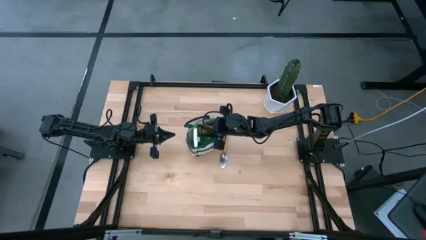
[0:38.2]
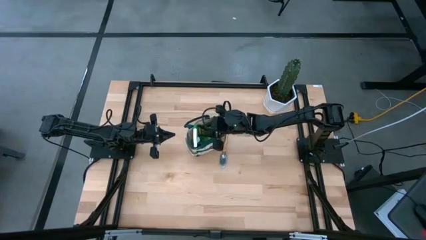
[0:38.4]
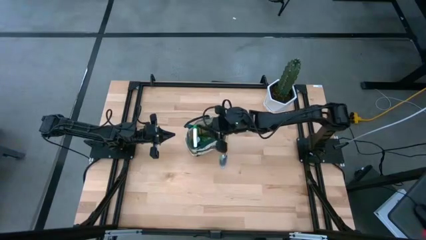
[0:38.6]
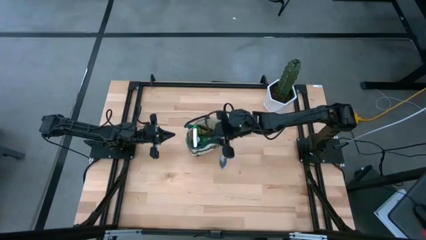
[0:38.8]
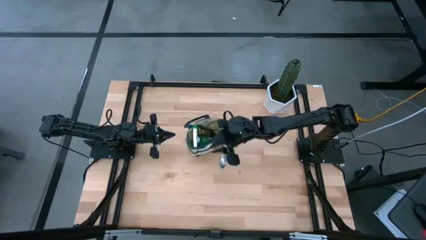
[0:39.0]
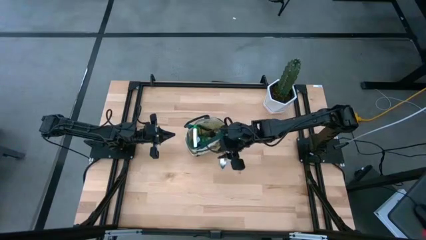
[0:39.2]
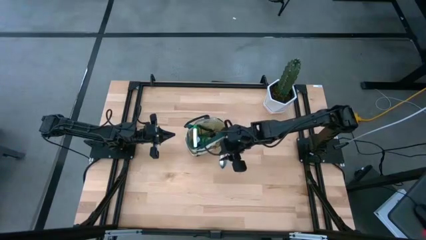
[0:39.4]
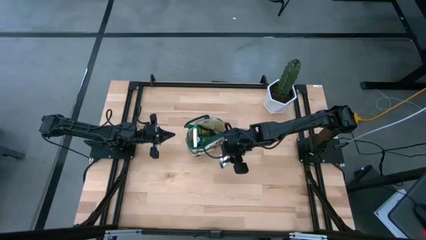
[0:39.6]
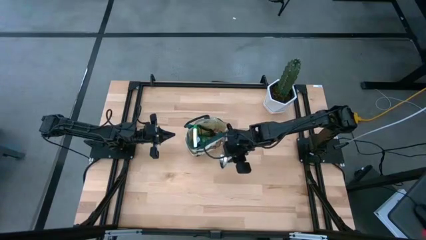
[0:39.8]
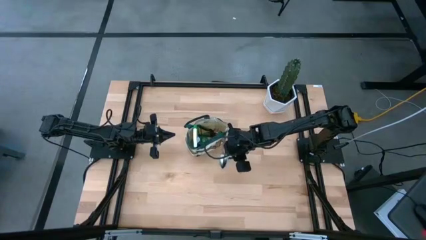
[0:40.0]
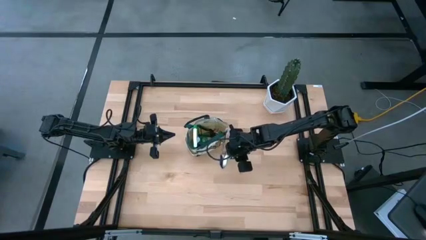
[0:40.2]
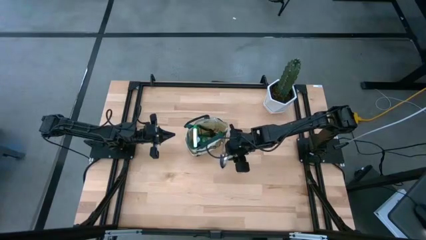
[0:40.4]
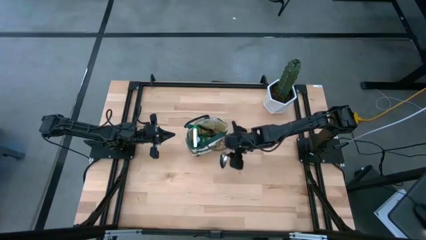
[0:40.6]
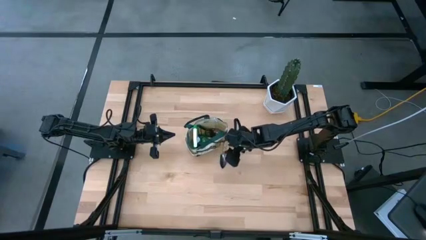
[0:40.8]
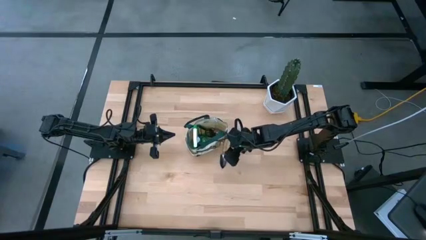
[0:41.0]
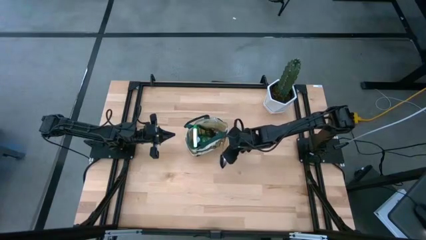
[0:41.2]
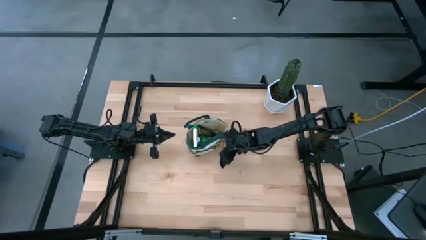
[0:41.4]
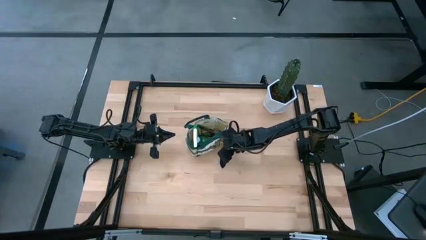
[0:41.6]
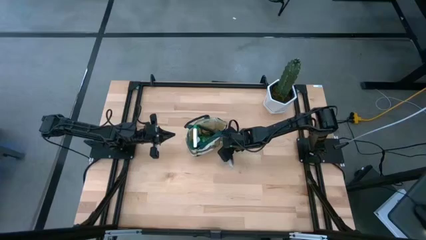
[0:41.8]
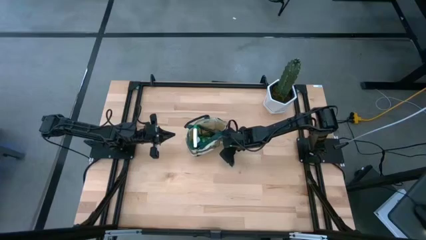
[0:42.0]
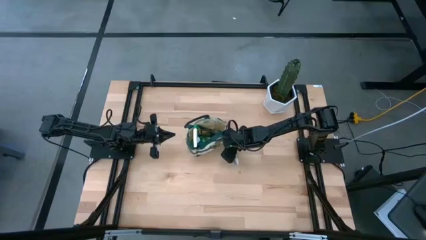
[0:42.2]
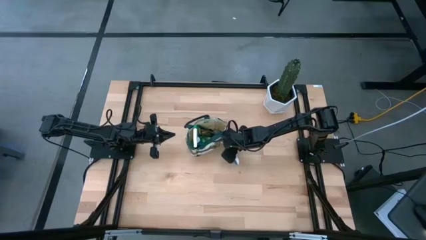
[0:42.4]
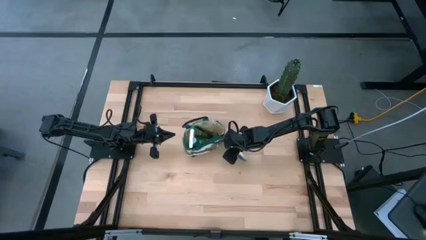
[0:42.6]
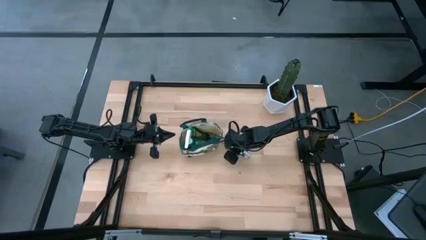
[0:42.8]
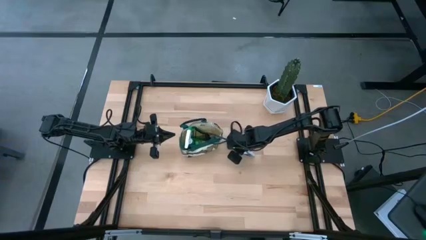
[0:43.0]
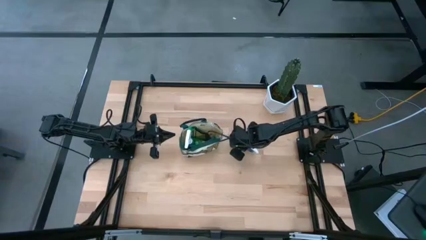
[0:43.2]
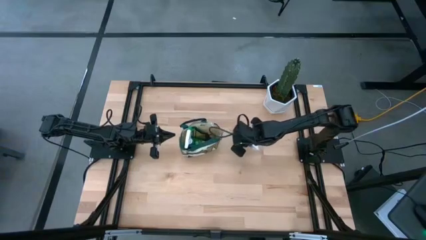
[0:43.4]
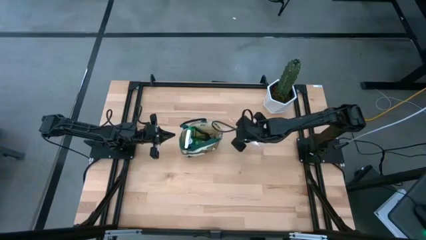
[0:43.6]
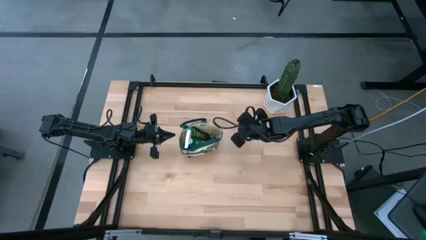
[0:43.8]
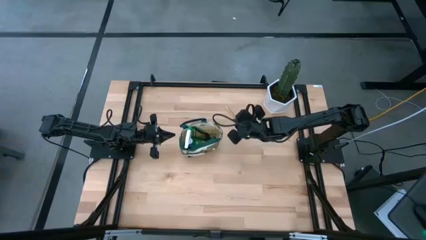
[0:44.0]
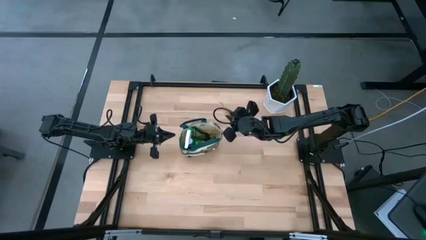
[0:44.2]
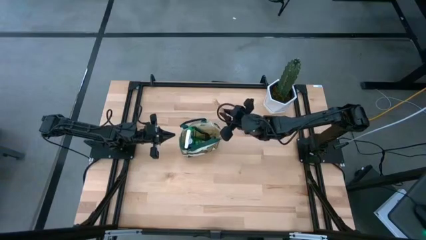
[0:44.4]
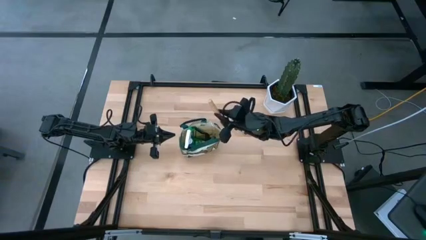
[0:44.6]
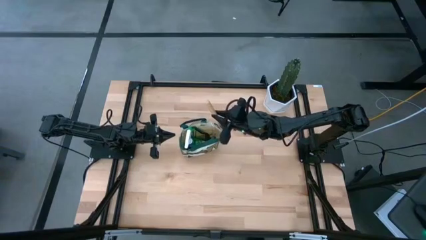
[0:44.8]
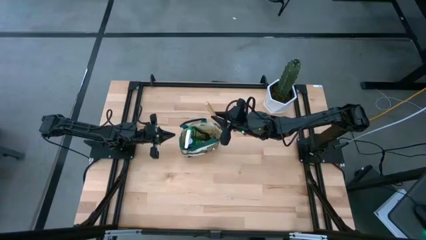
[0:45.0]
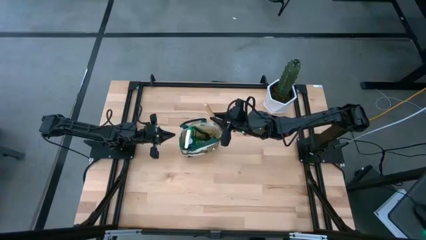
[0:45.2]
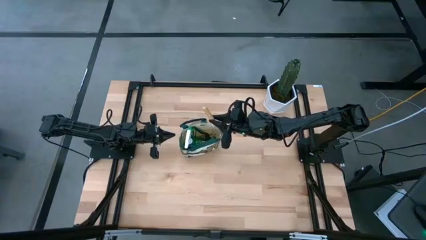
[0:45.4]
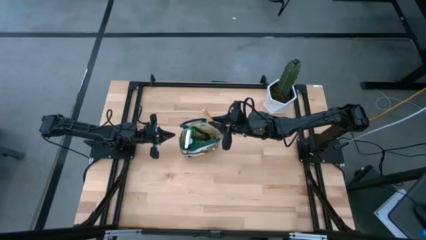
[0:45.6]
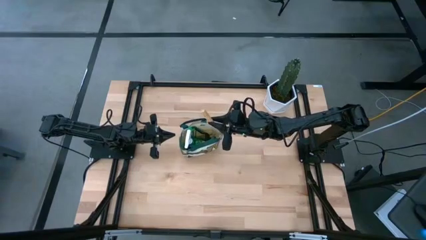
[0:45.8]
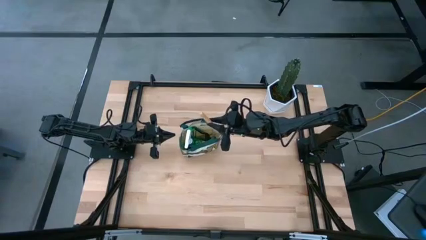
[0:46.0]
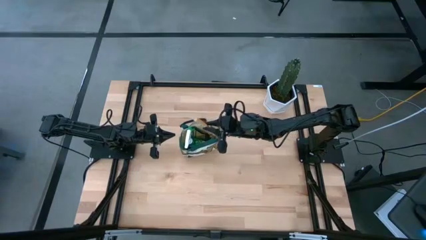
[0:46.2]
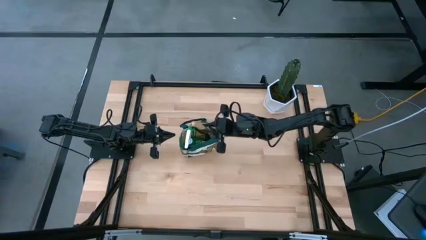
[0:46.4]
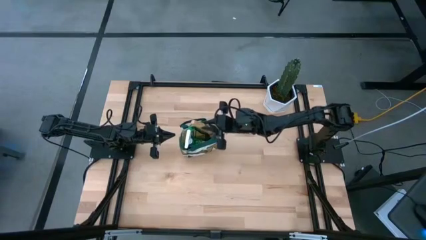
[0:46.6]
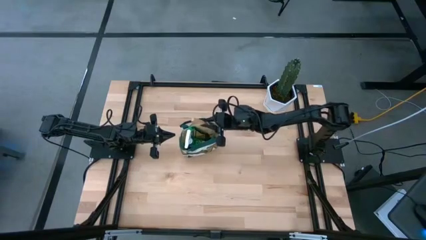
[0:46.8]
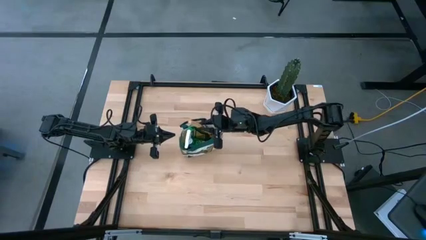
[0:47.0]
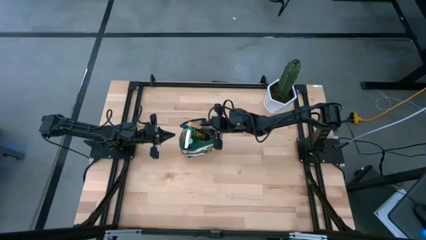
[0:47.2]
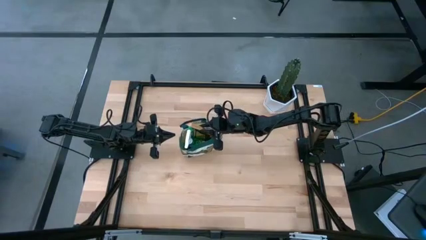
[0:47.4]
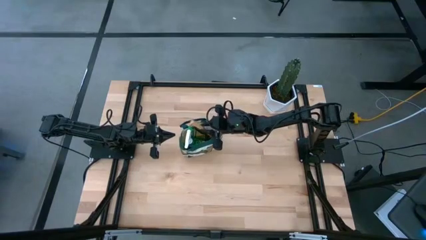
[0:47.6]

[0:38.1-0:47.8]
Task: Pick & Place Garden tools in Gardening bag
Put the trowel into the gardening bag

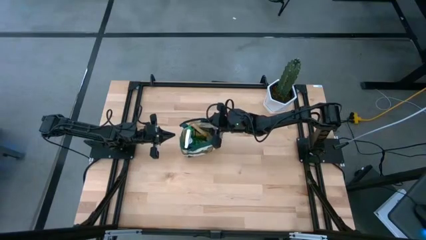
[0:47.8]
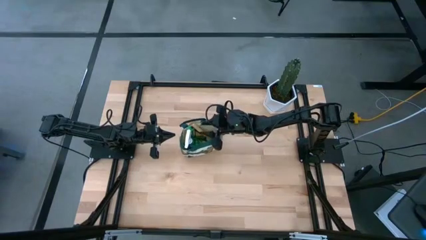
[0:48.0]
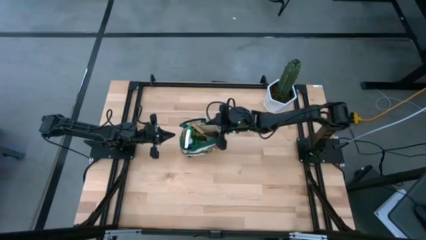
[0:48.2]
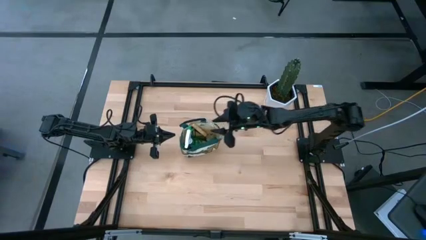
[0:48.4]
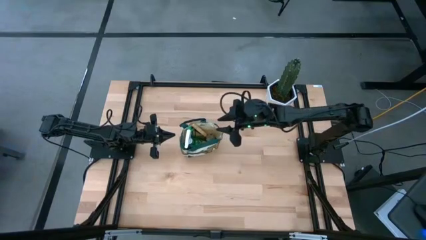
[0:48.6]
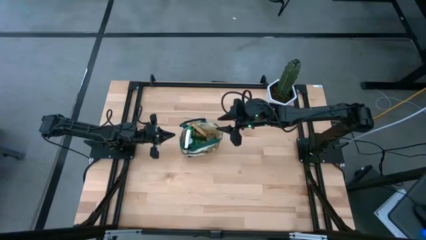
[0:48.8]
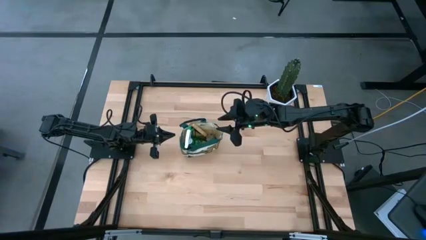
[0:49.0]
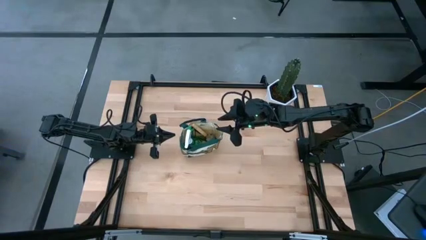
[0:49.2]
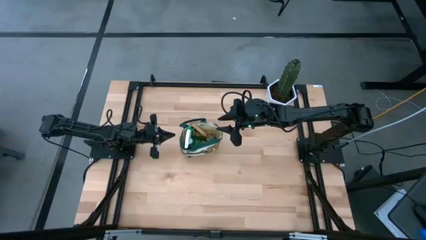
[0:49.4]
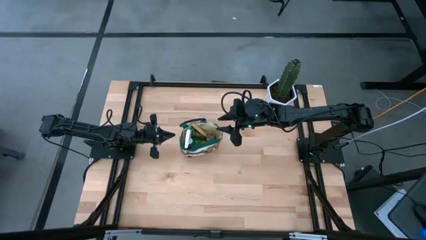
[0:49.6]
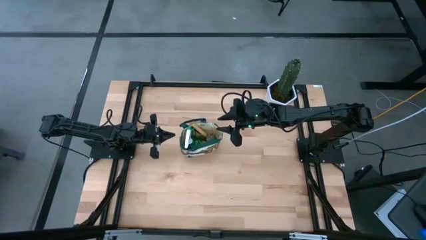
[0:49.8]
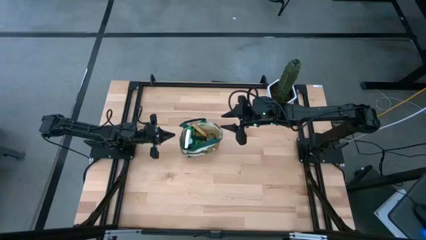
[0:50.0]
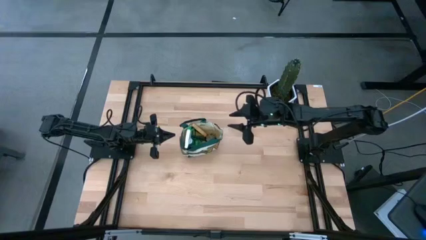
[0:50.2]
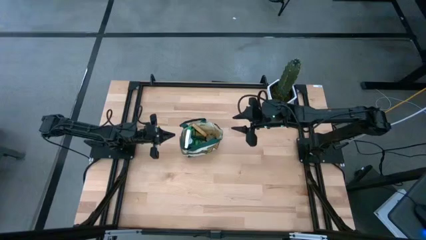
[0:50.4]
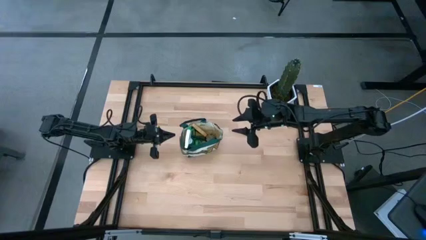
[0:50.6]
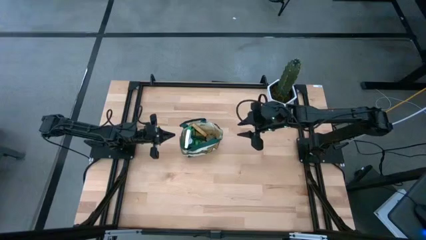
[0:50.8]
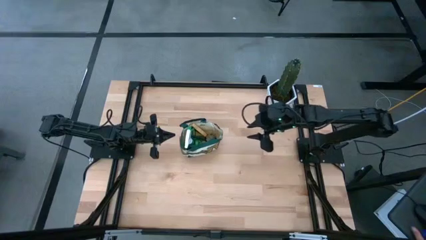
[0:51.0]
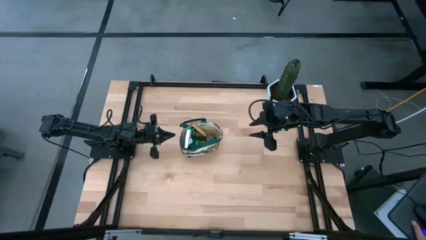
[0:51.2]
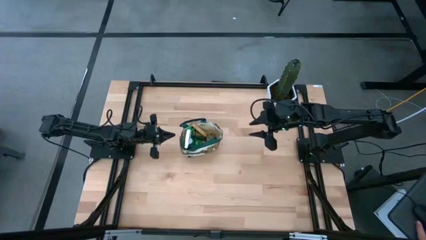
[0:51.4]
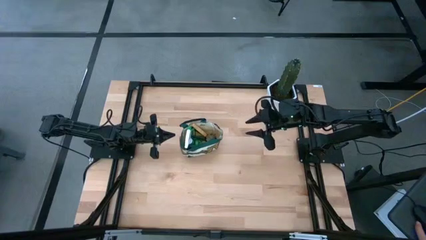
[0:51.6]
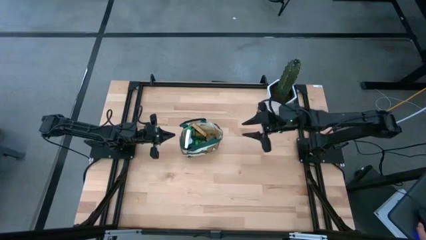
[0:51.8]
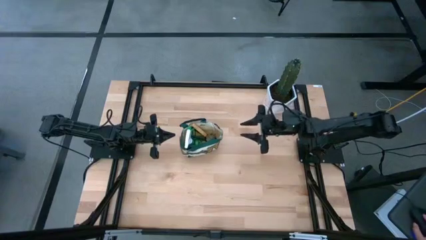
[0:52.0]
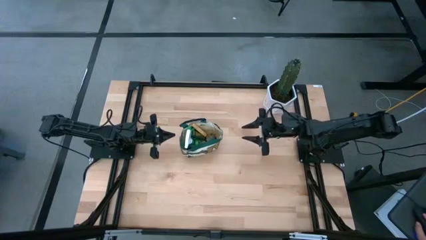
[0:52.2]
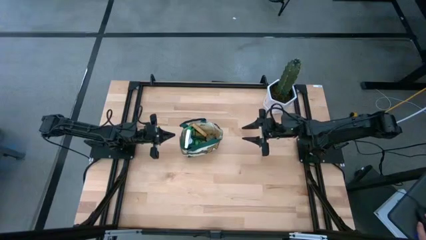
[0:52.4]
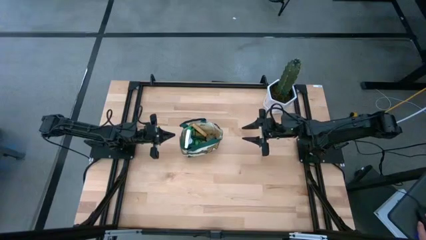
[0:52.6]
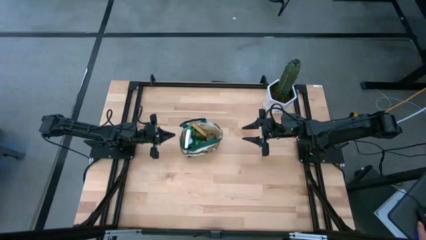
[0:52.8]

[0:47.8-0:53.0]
Return to Home Position
